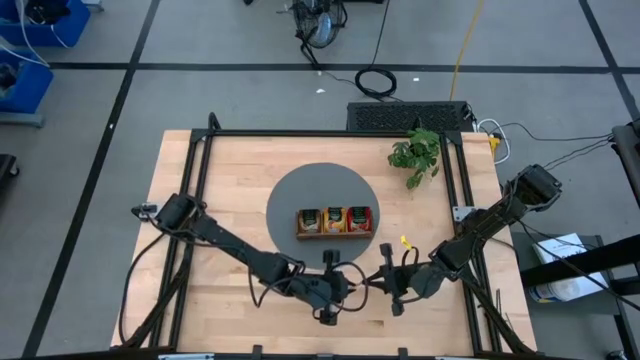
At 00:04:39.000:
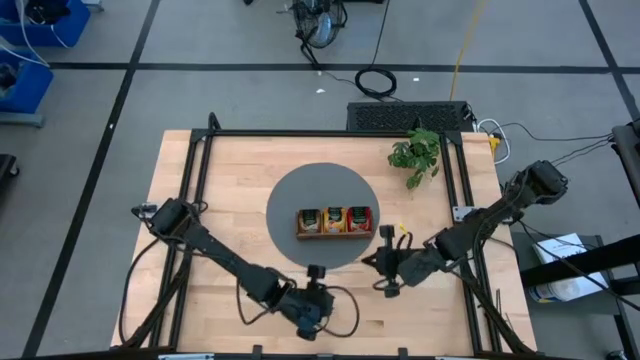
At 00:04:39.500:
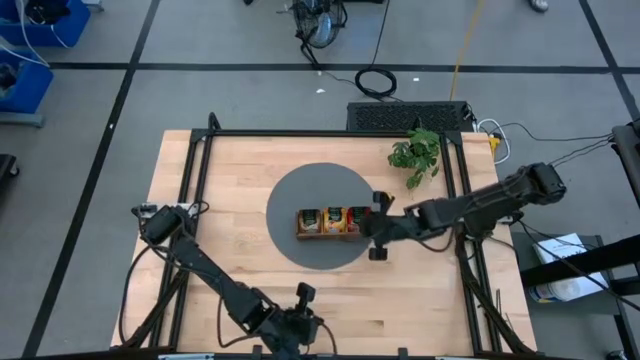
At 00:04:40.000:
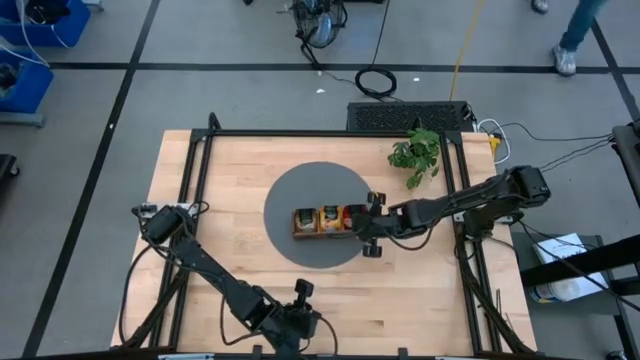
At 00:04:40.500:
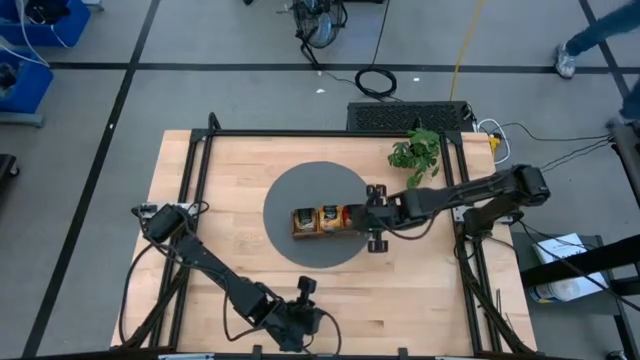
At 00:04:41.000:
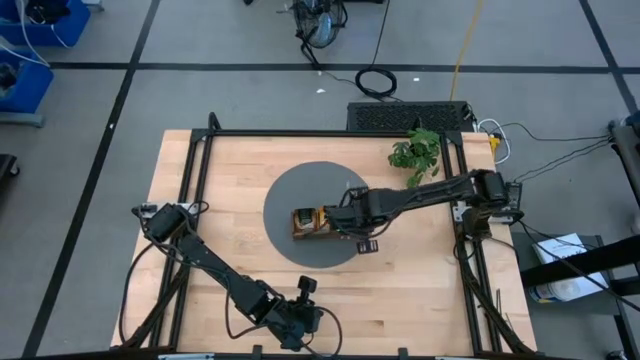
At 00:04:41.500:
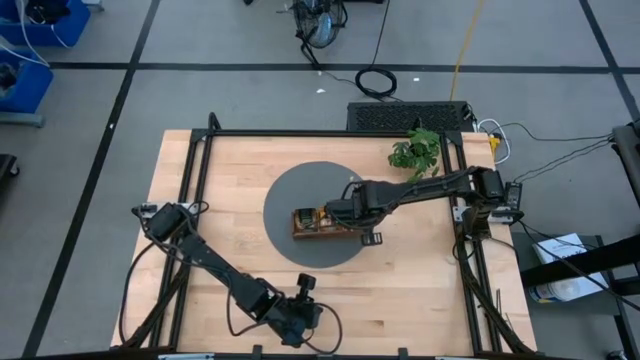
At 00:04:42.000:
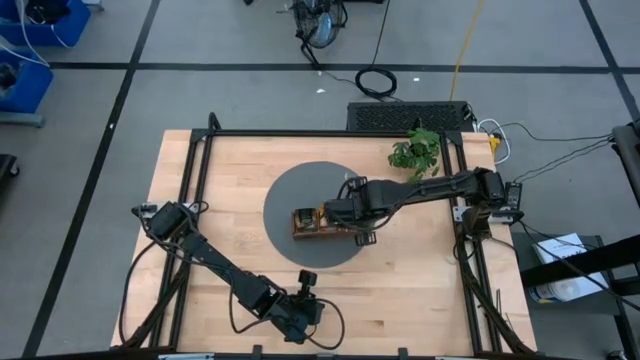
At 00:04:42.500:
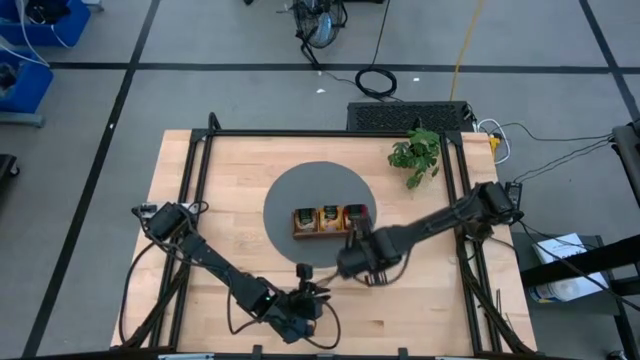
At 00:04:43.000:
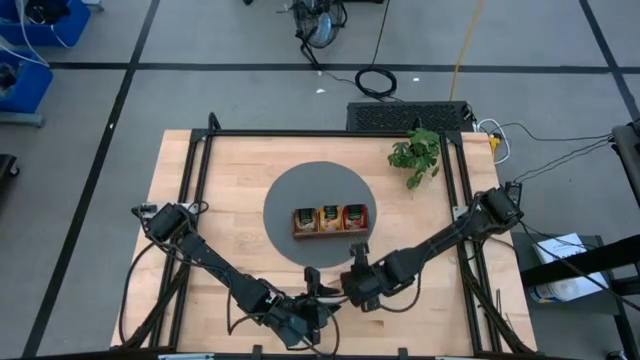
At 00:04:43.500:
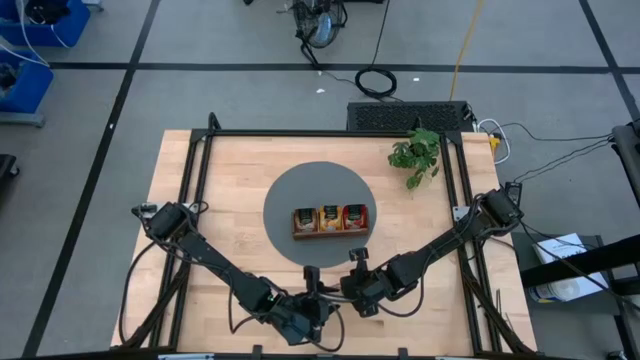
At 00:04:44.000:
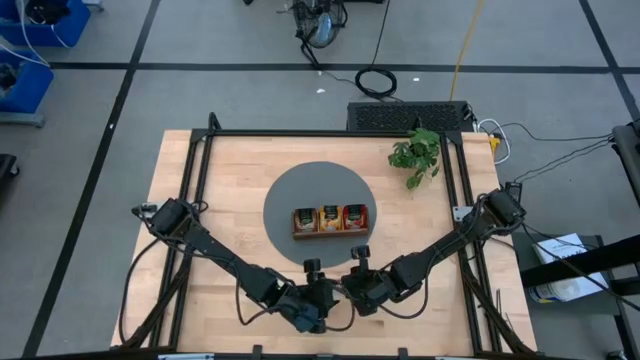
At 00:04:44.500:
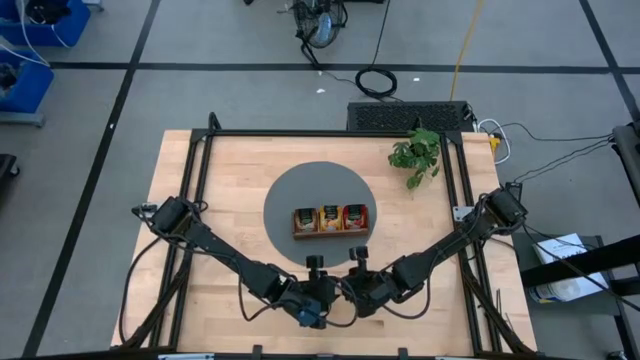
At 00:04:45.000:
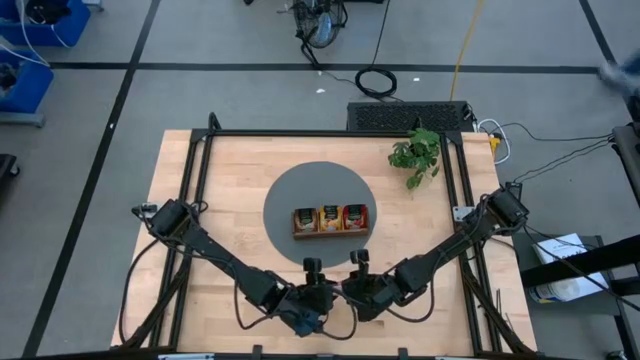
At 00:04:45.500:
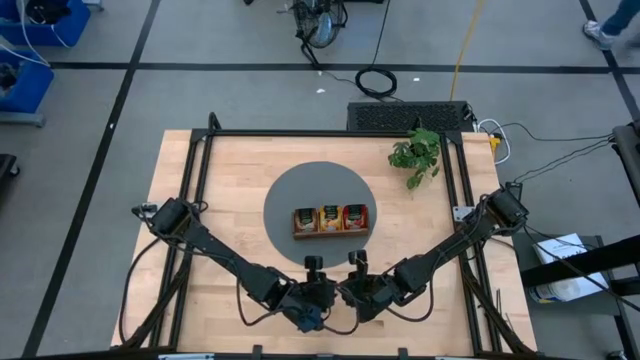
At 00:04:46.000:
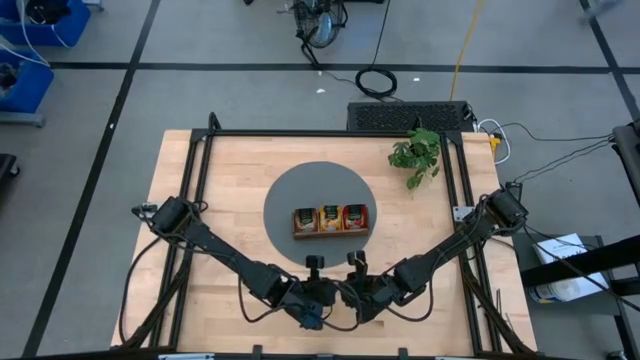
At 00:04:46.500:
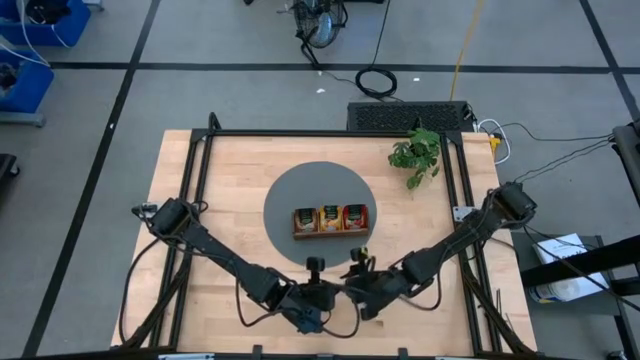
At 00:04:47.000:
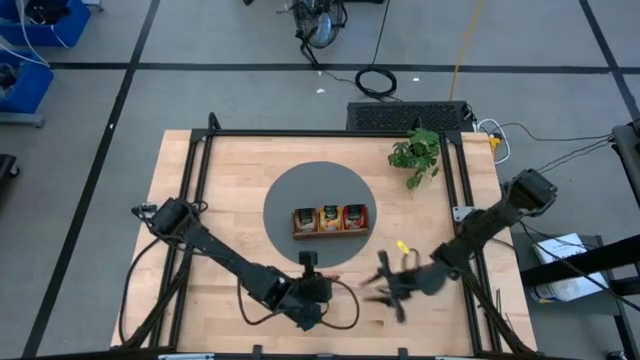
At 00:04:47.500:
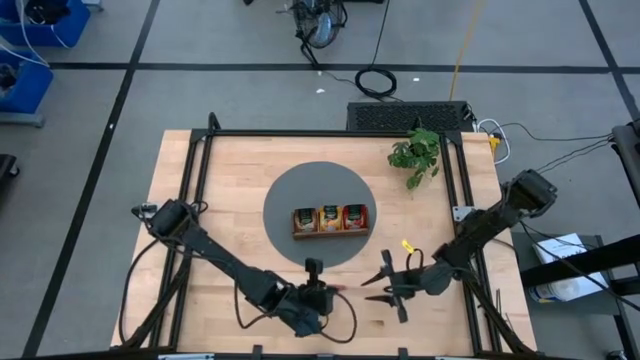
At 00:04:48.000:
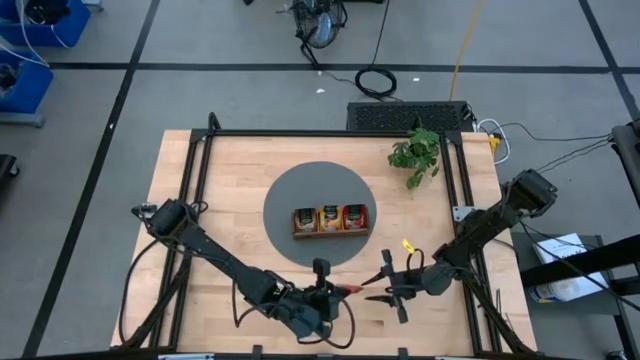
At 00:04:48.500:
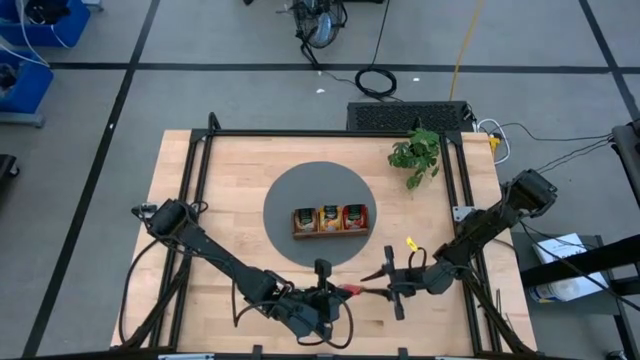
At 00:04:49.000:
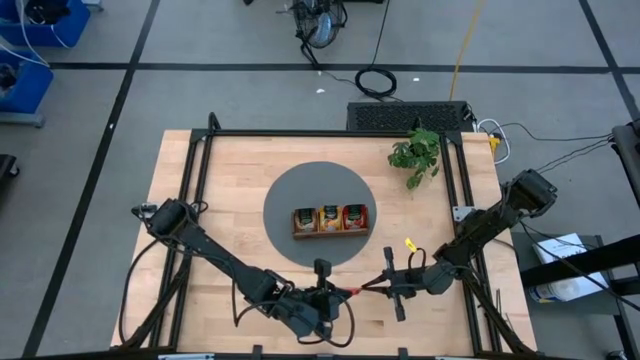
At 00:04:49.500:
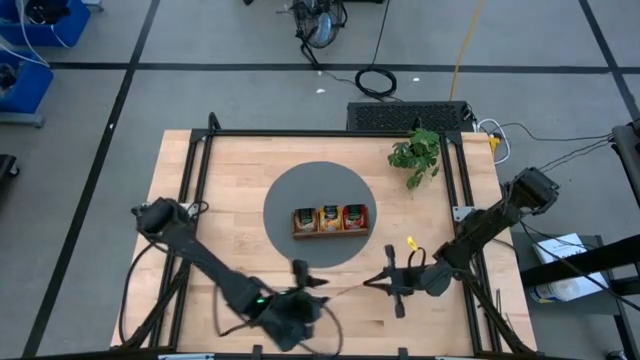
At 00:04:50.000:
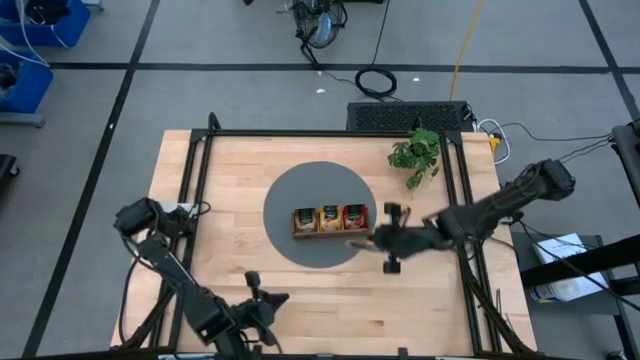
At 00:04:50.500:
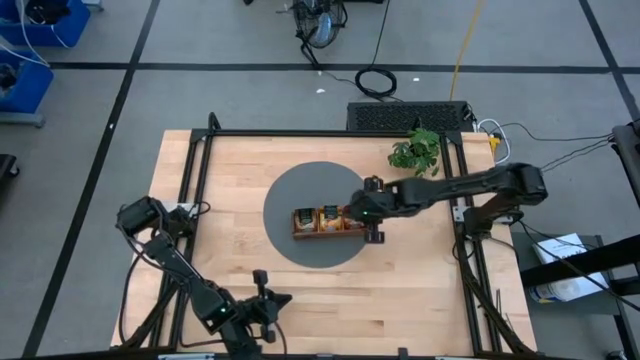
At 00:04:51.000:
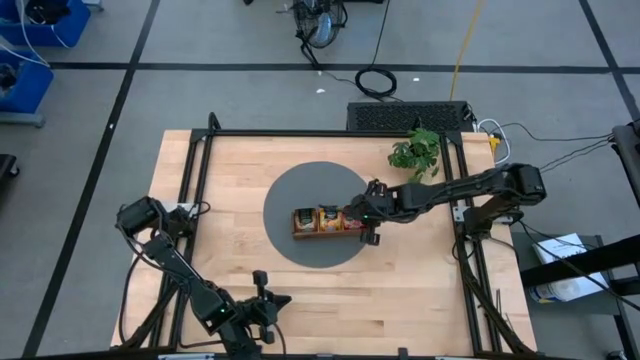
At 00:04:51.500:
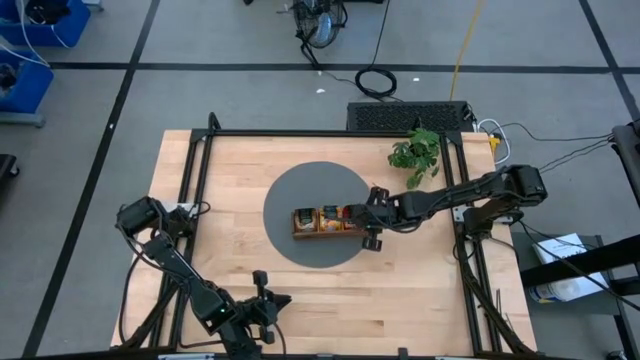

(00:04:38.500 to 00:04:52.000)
Task: Pick & Place Tea
Put the red tea sachet into the right section of the wooden organizer

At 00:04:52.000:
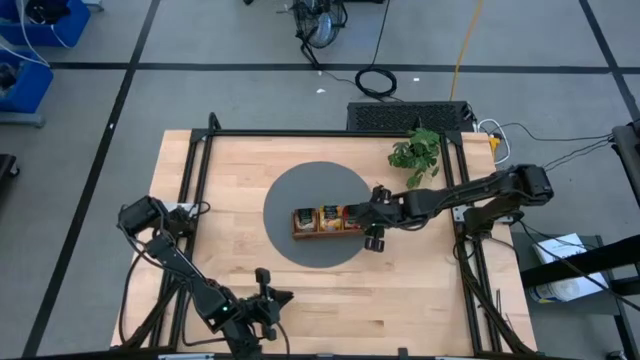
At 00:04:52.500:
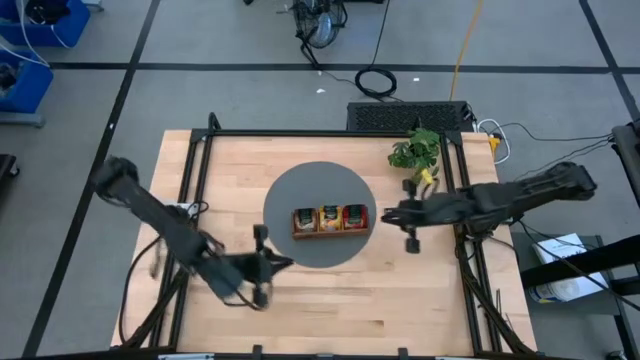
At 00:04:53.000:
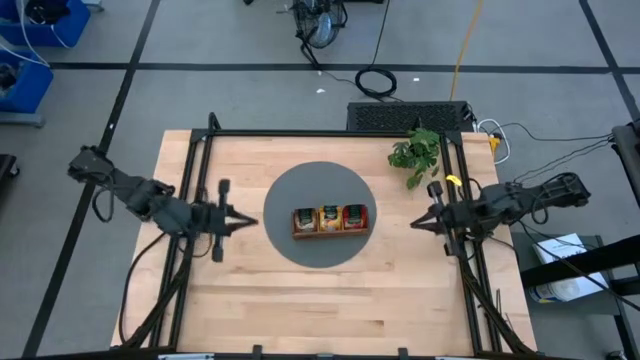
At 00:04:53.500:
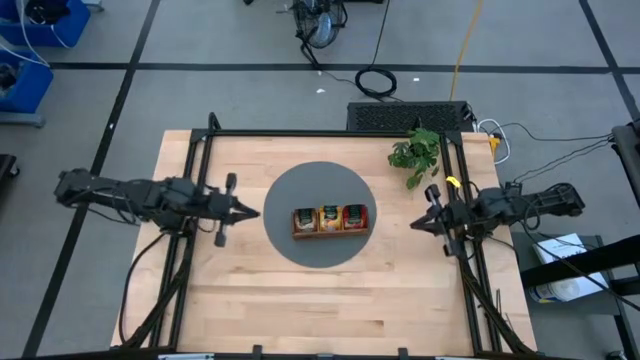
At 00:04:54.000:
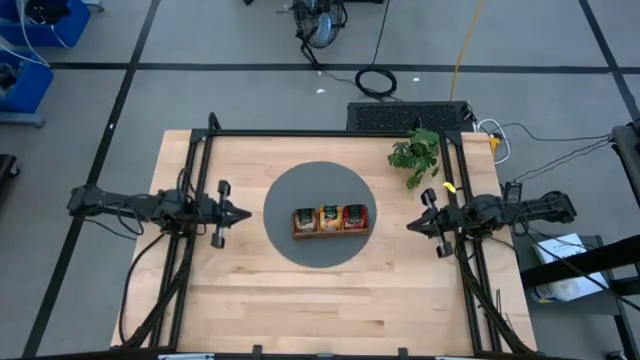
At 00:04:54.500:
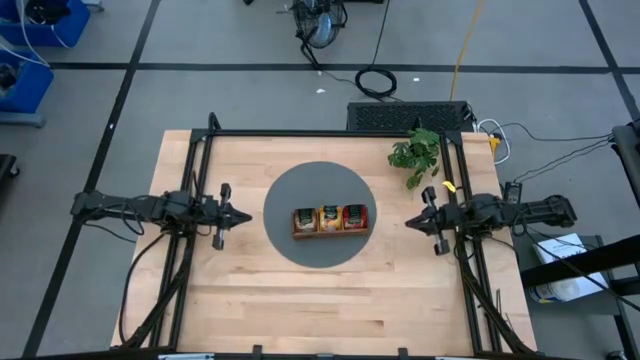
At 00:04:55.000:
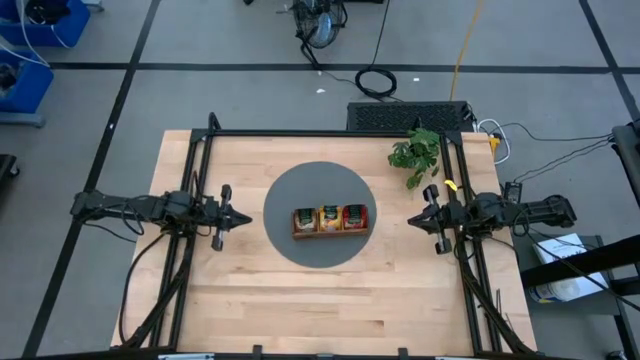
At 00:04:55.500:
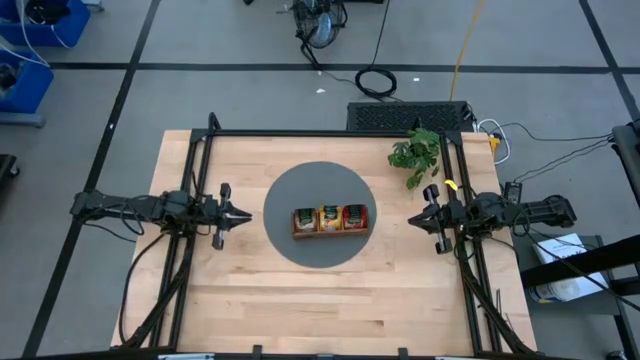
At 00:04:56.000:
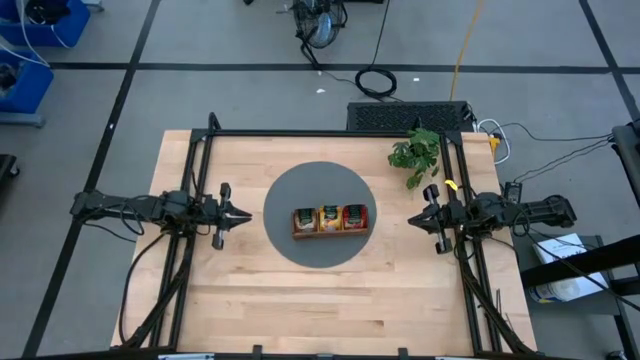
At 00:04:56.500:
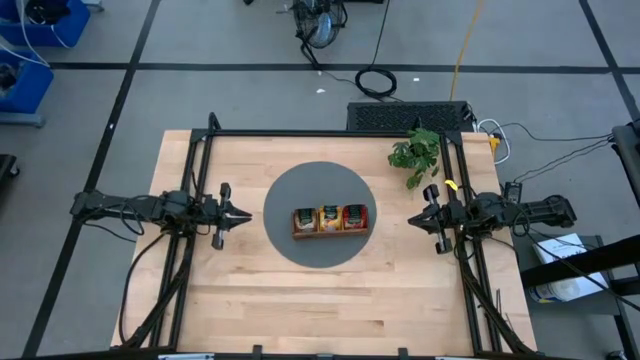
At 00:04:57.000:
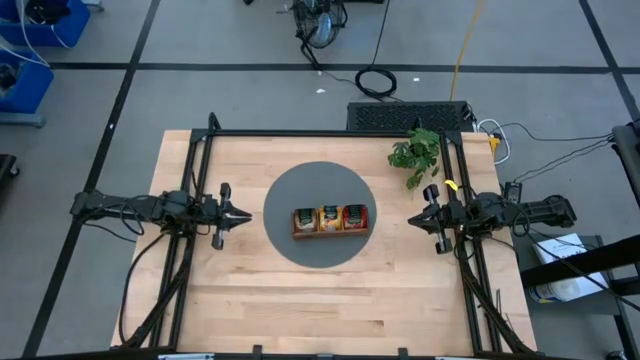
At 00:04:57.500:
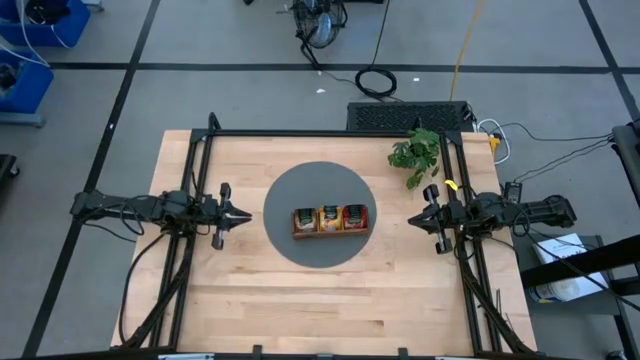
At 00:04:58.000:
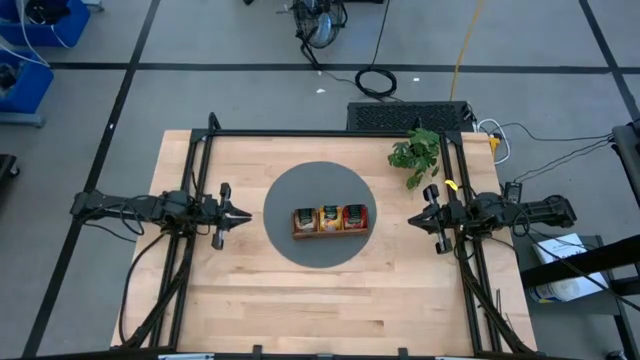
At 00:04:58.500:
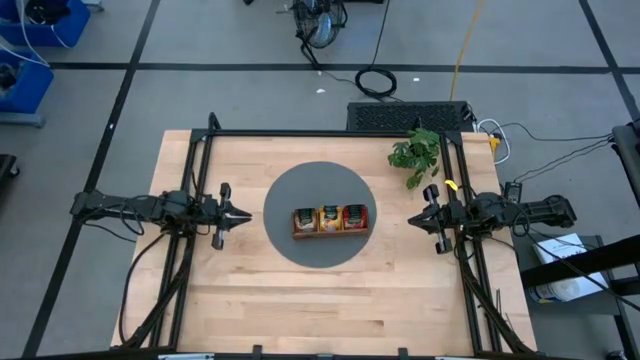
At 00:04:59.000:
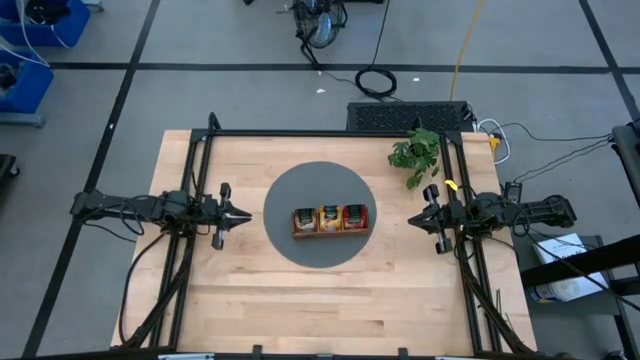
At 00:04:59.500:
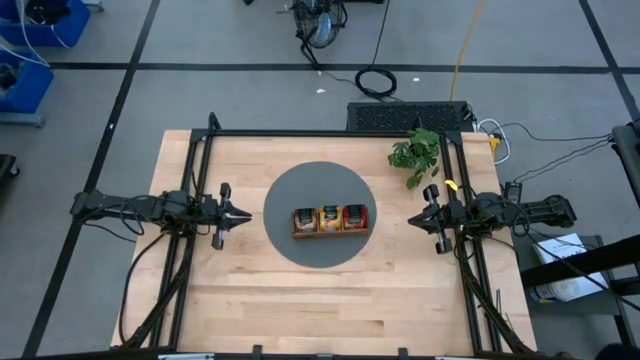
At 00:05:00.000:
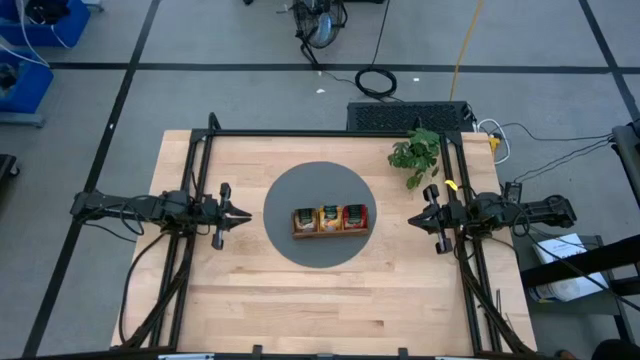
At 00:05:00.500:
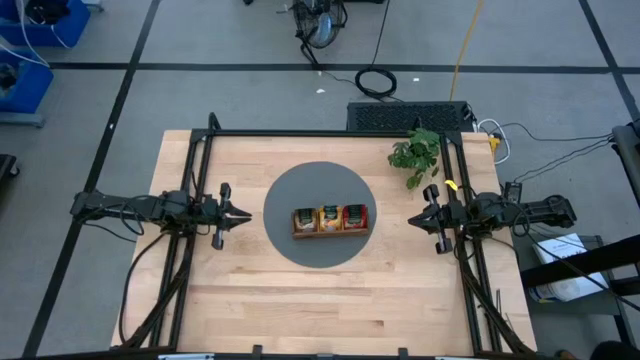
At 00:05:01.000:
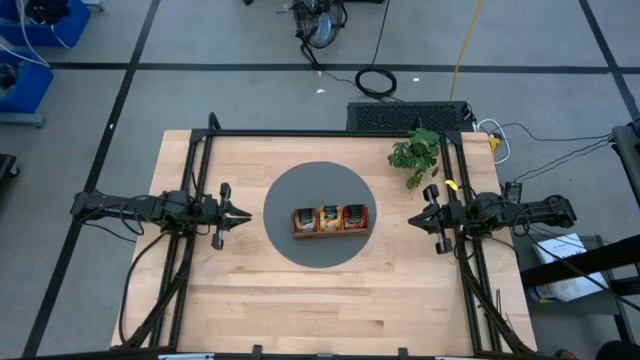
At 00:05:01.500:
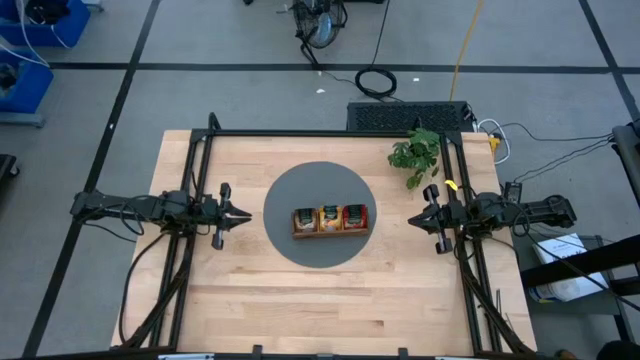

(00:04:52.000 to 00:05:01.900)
Return to Home Position
